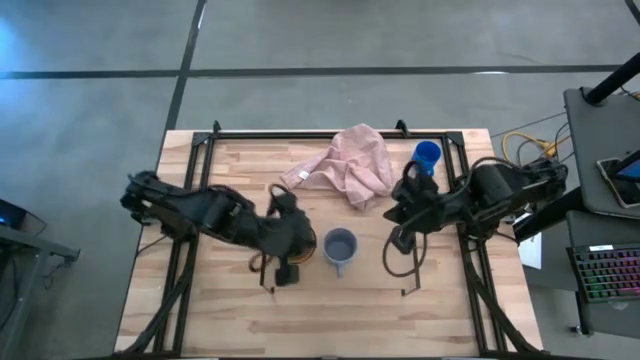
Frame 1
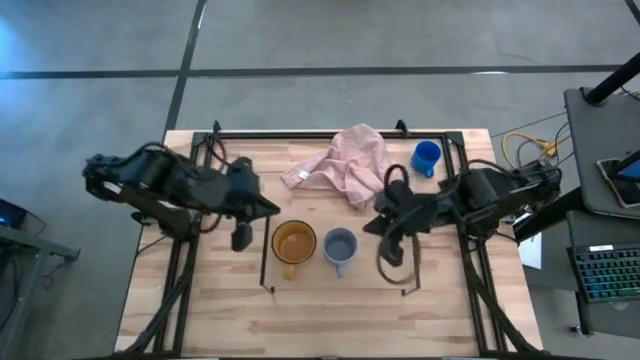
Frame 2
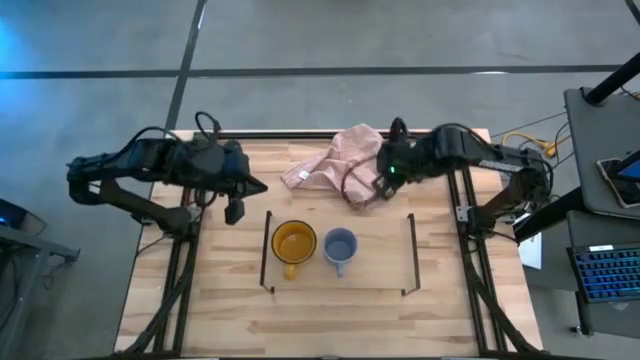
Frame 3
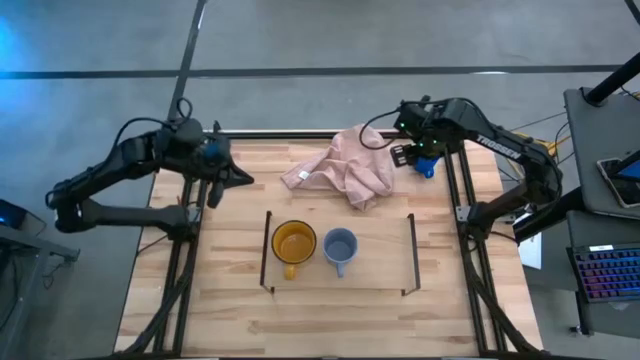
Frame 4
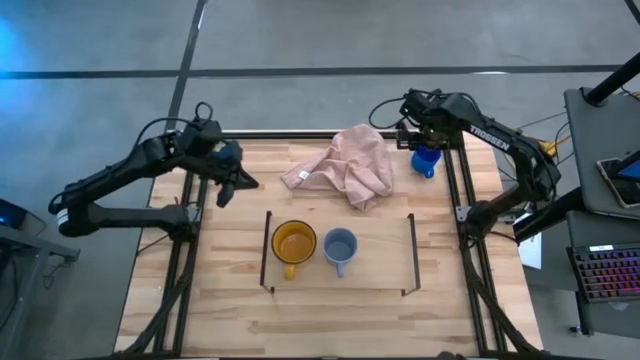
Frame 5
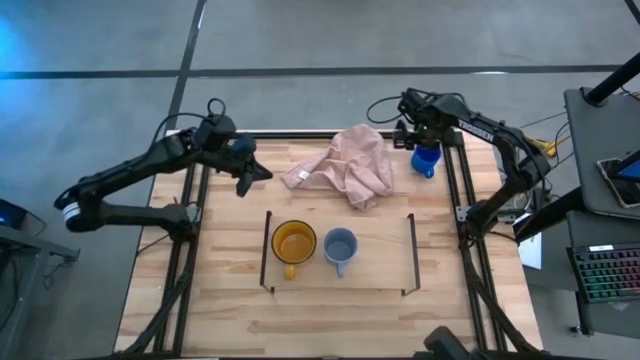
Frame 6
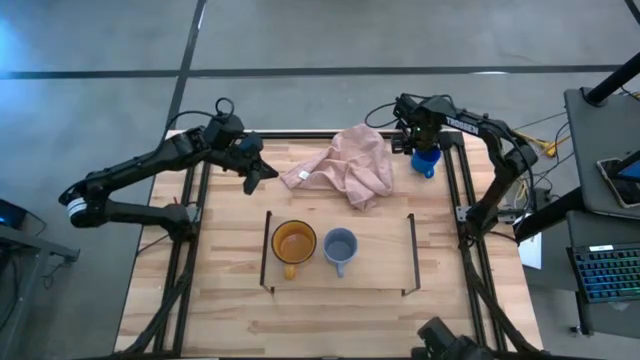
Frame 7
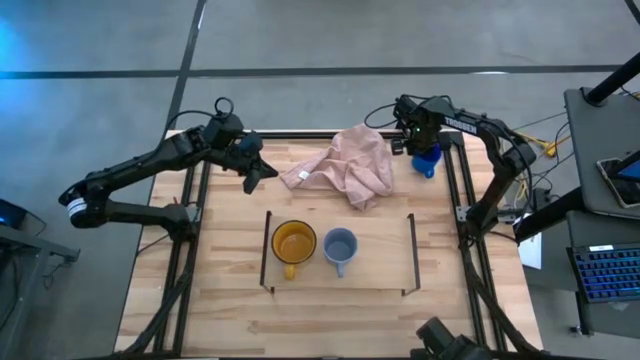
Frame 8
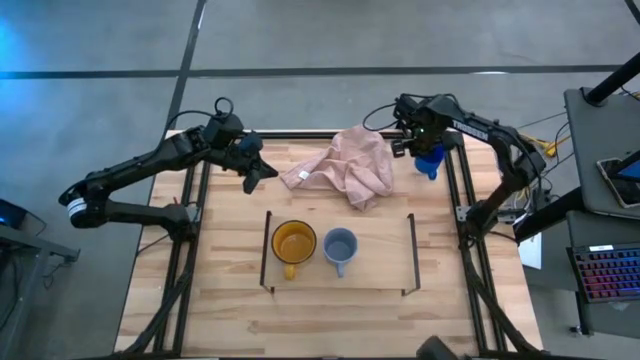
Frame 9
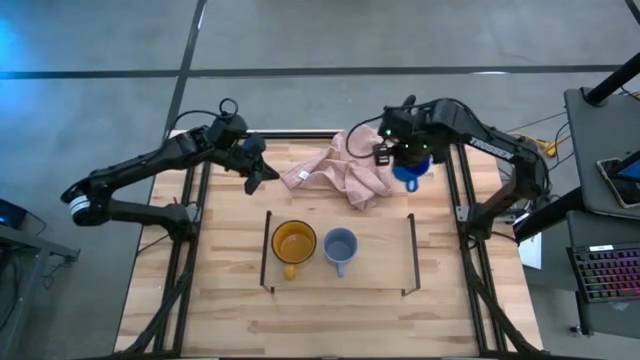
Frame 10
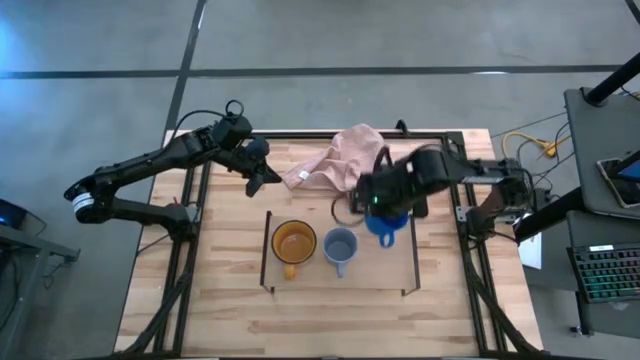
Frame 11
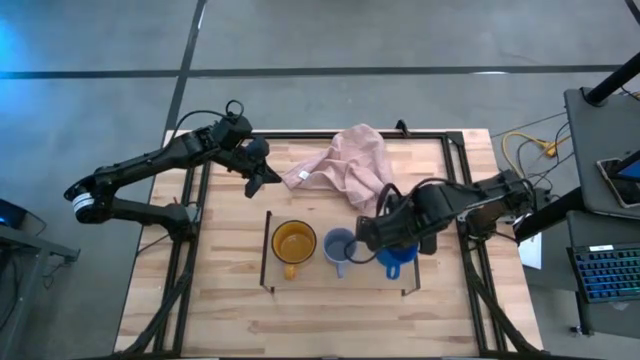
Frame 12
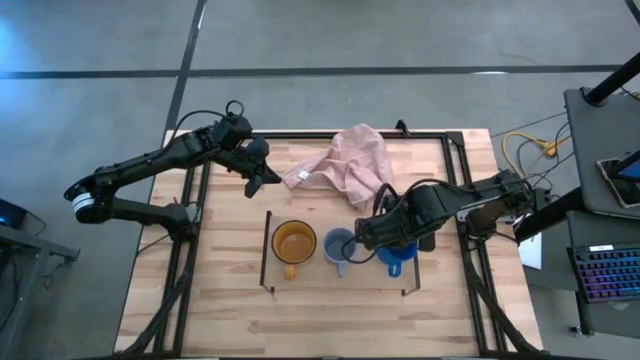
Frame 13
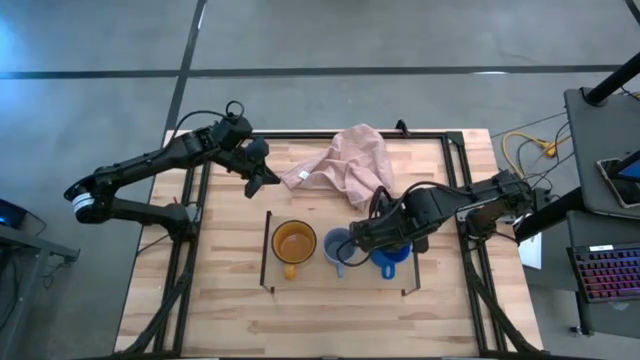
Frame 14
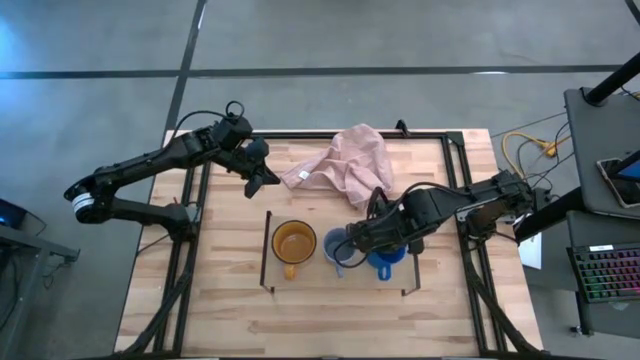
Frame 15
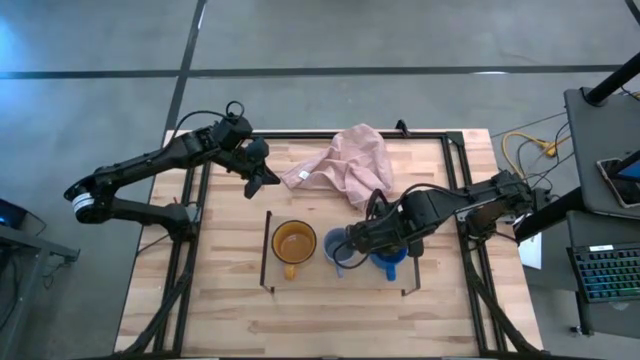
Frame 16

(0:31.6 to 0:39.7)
Task: Stack small to large cups/mugs on shelf
Put the blue mug on the shelf

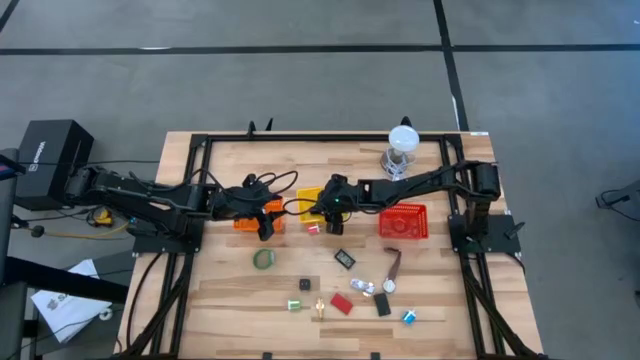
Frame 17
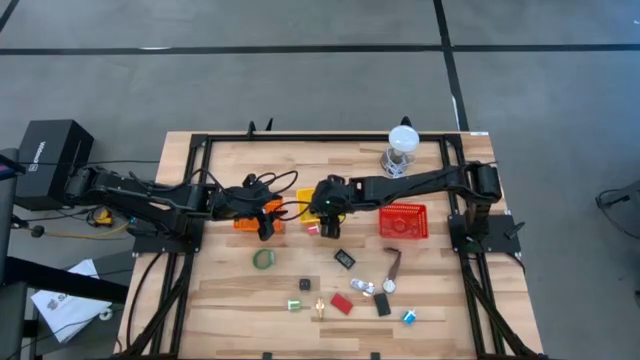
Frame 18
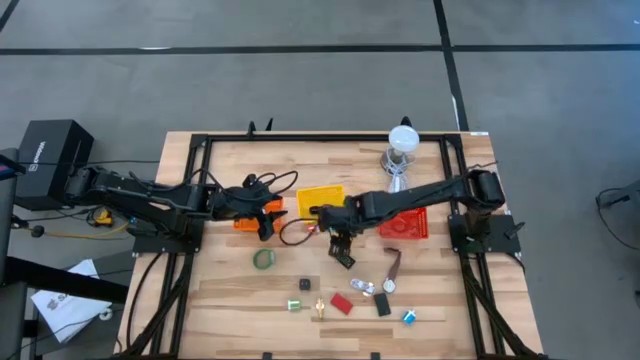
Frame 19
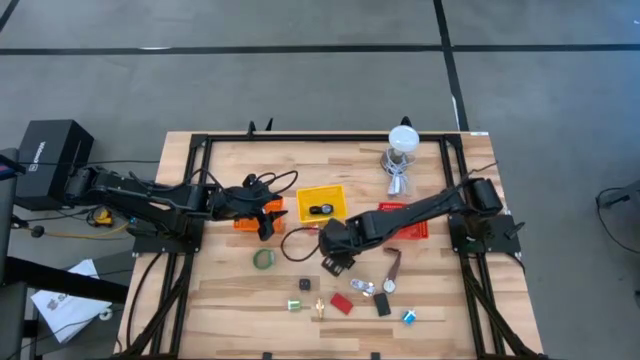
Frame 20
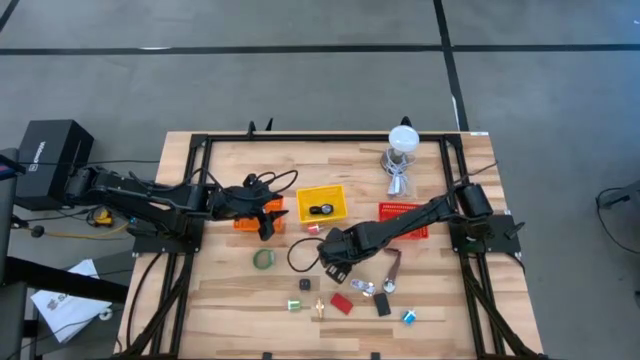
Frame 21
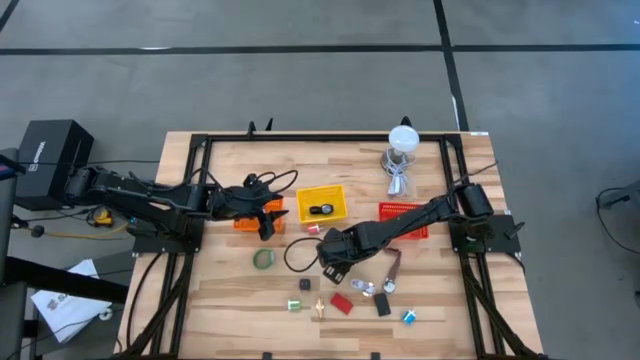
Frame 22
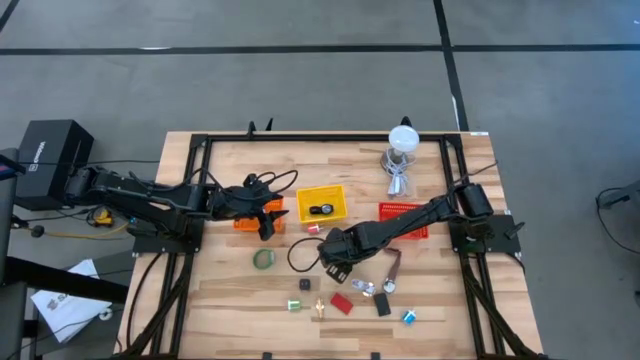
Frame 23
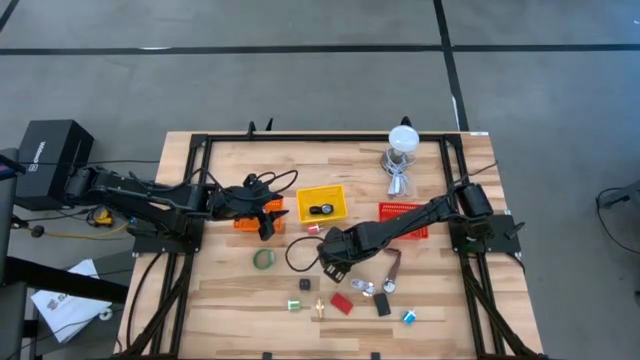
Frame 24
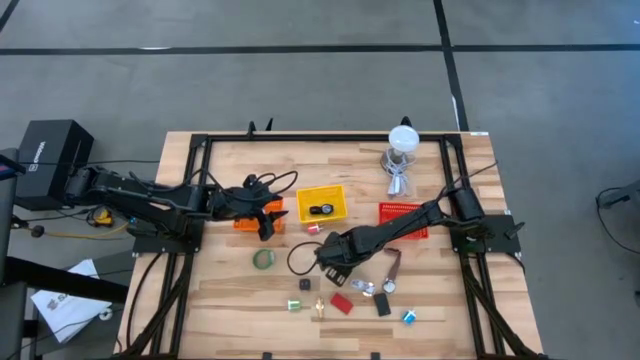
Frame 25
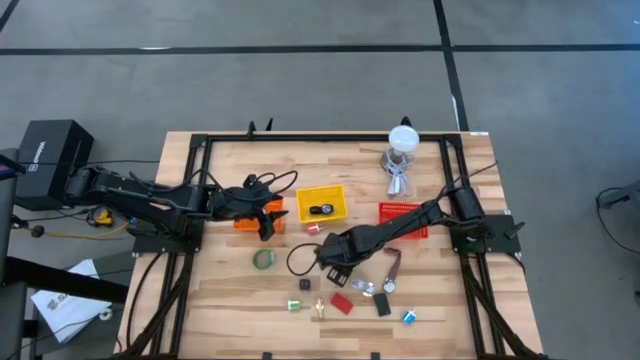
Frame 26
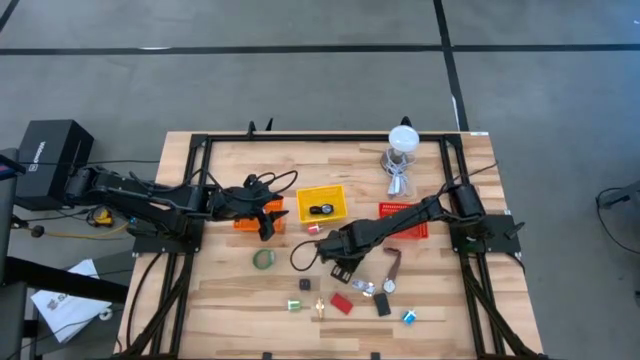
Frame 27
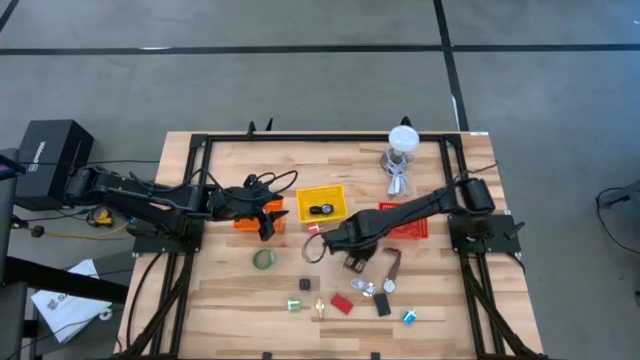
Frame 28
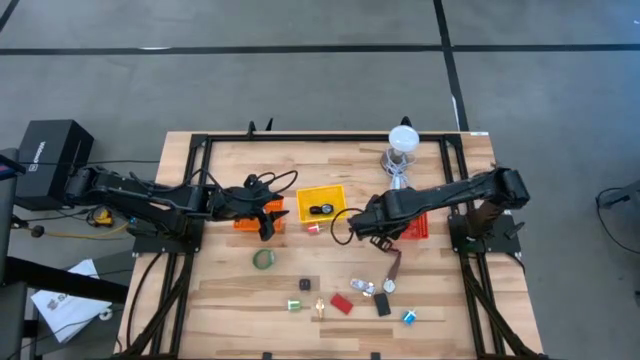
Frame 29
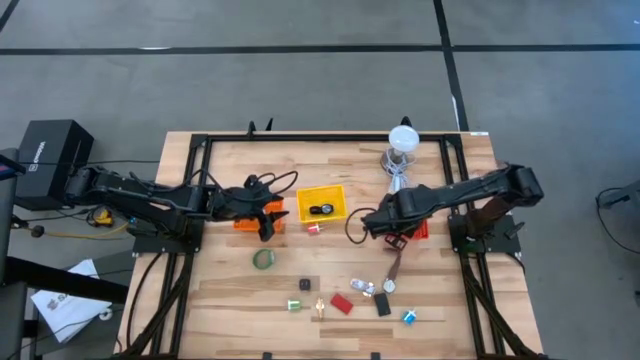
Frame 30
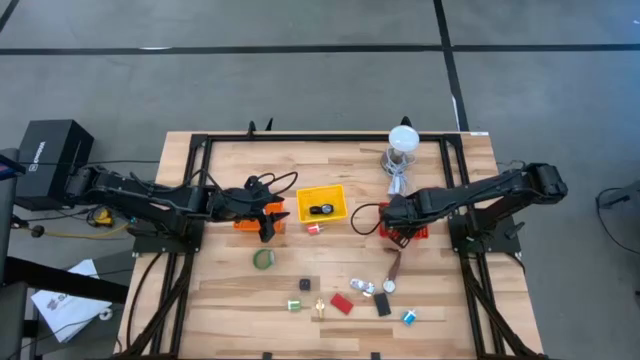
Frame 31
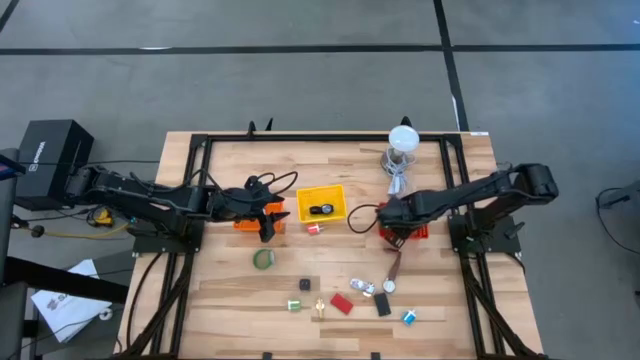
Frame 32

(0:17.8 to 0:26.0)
Task: Pick & Place Office items
Put the black digital clock into the red bin

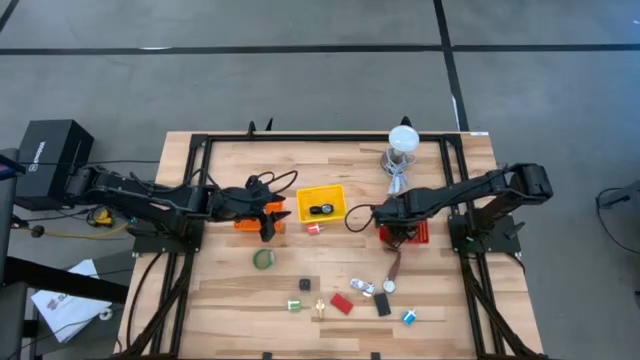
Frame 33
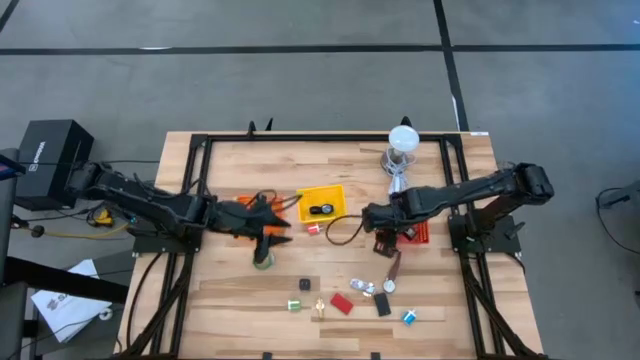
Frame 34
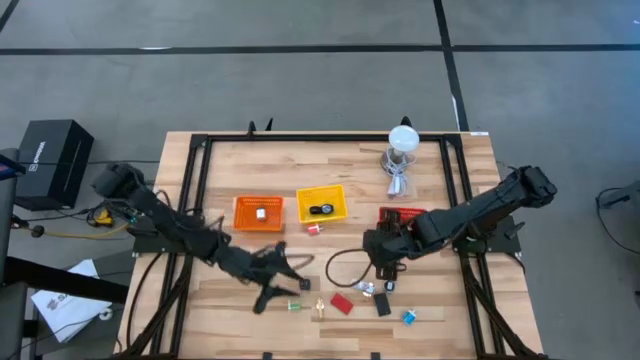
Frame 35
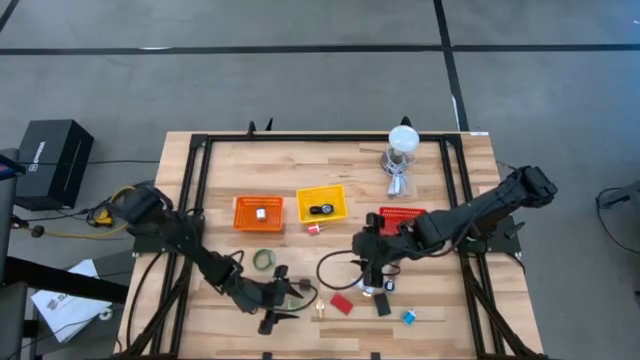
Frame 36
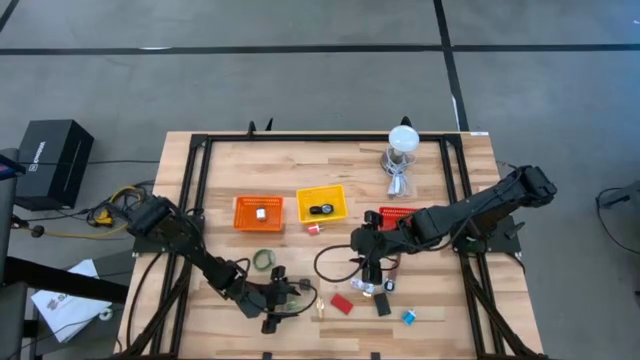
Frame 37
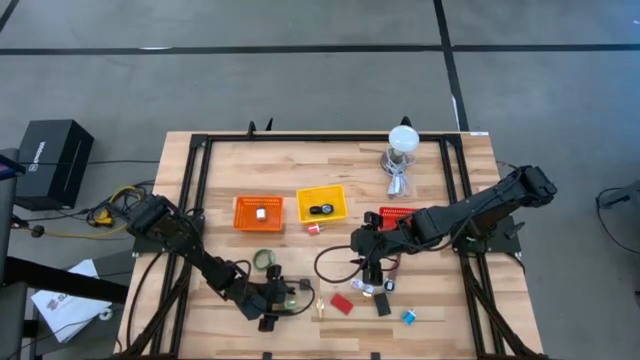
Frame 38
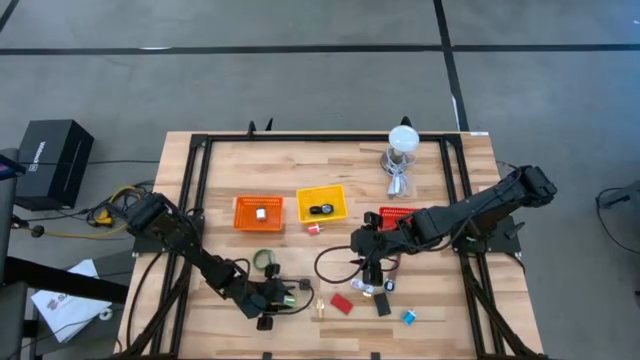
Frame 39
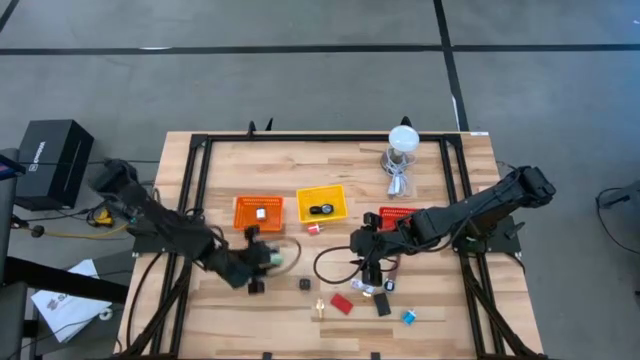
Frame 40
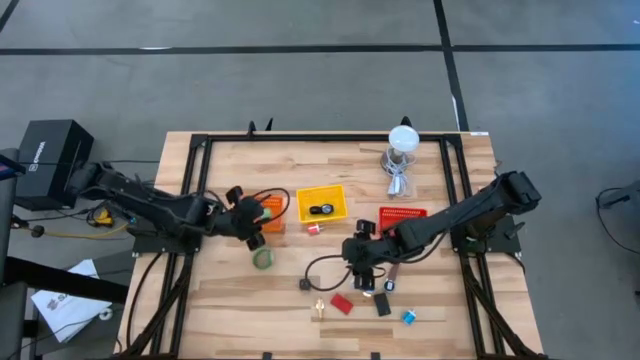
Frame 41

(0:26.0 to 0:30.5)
Put the green charging adapter into the orange bin
